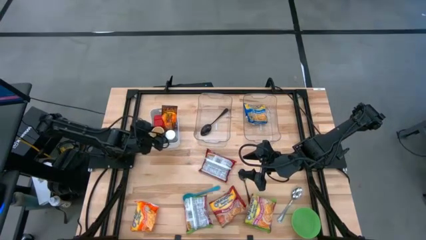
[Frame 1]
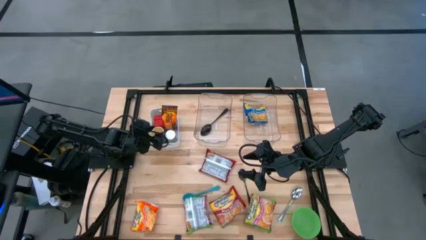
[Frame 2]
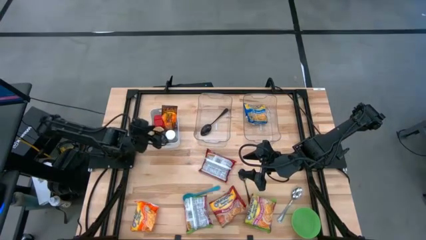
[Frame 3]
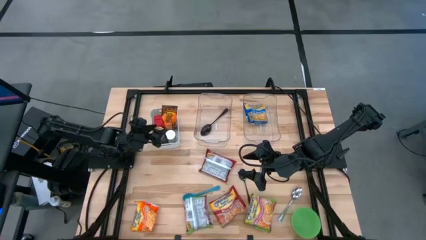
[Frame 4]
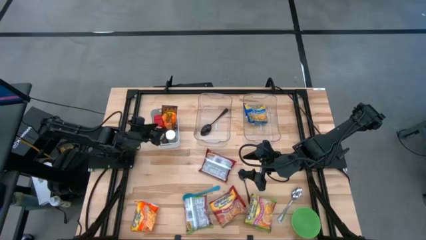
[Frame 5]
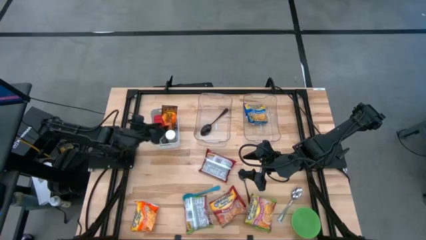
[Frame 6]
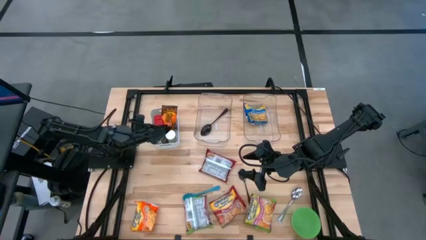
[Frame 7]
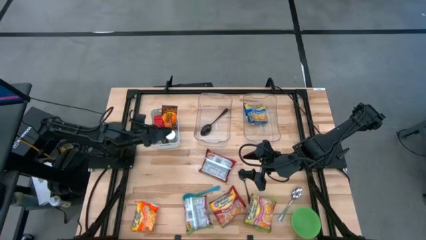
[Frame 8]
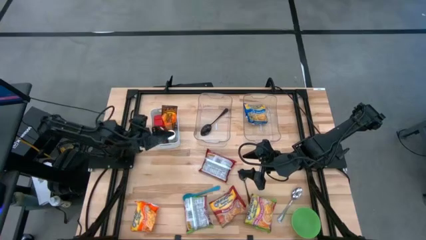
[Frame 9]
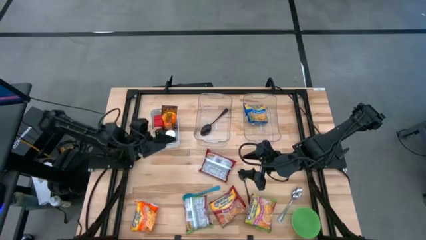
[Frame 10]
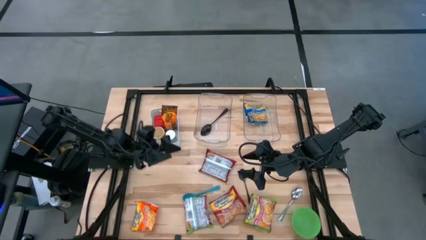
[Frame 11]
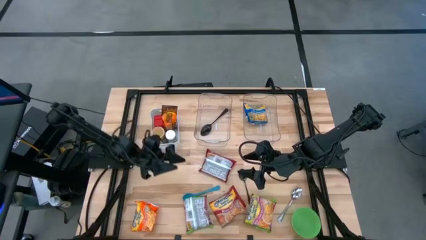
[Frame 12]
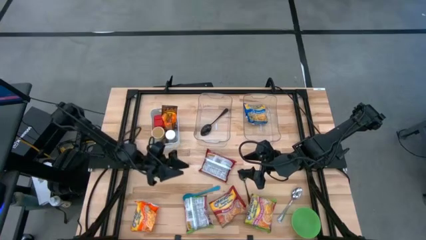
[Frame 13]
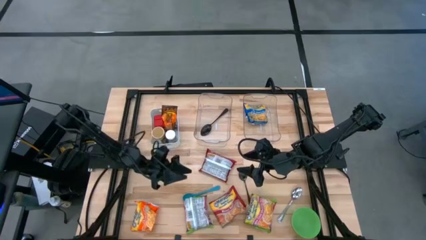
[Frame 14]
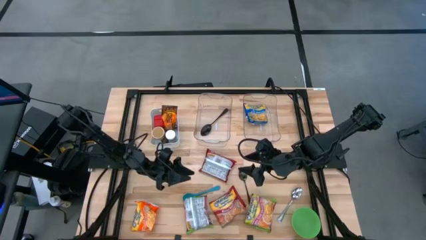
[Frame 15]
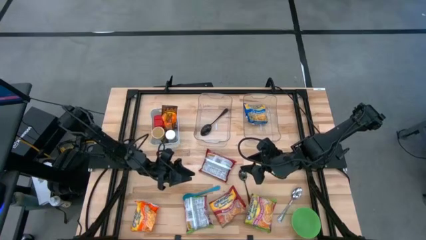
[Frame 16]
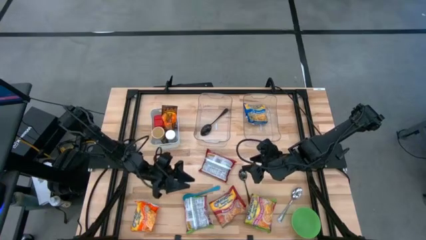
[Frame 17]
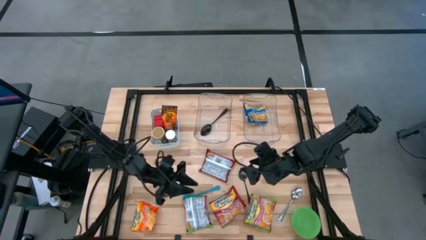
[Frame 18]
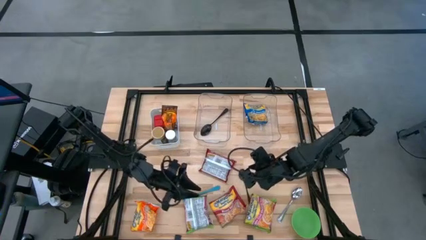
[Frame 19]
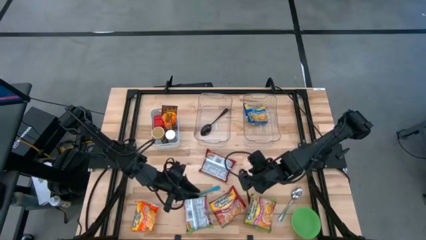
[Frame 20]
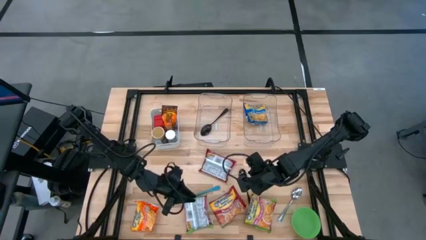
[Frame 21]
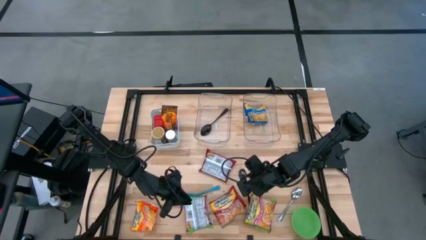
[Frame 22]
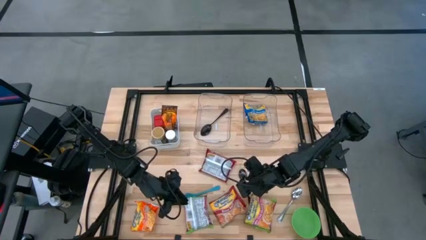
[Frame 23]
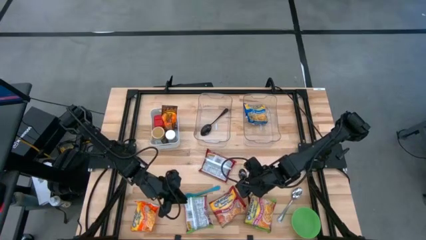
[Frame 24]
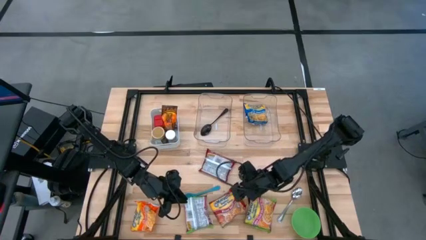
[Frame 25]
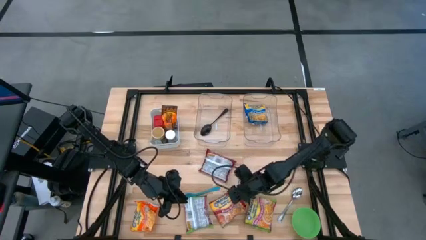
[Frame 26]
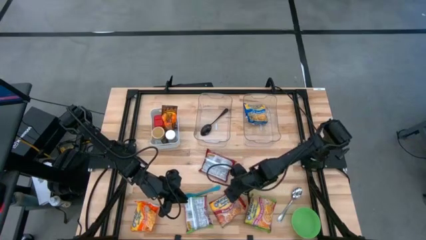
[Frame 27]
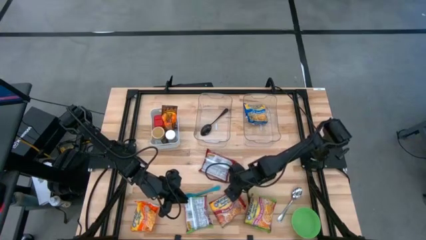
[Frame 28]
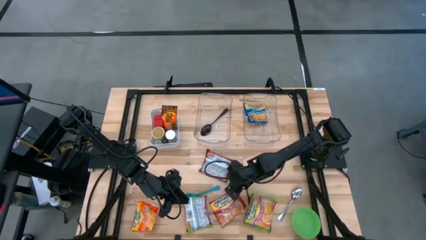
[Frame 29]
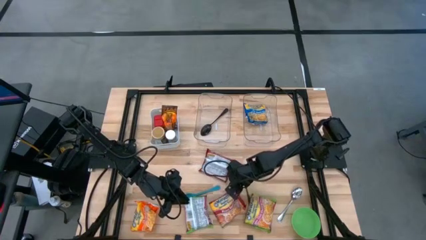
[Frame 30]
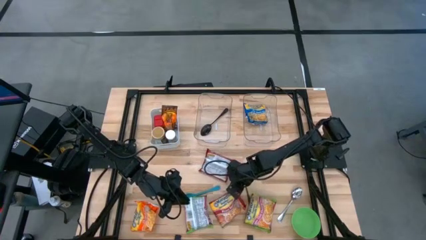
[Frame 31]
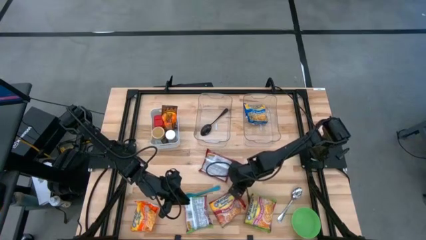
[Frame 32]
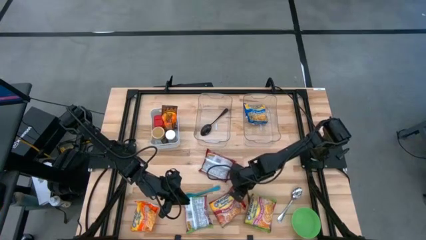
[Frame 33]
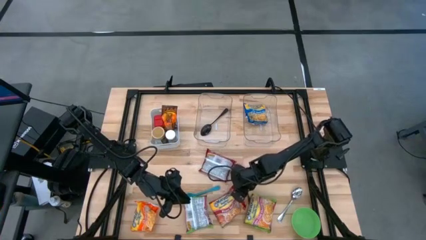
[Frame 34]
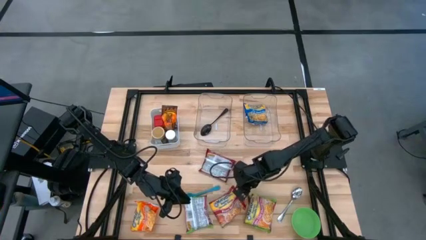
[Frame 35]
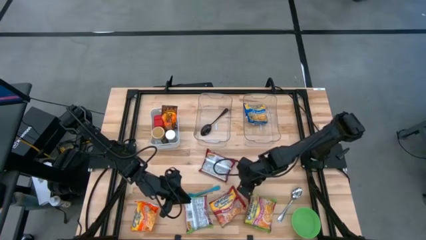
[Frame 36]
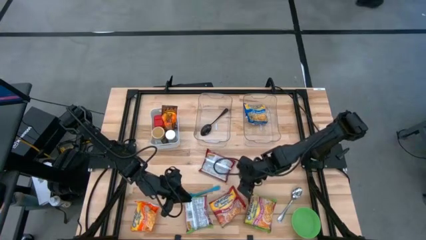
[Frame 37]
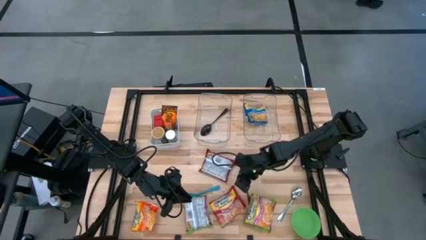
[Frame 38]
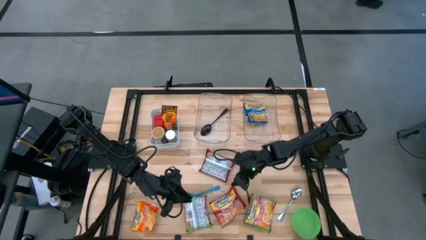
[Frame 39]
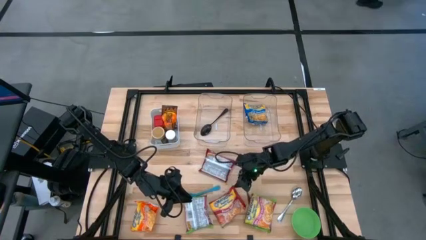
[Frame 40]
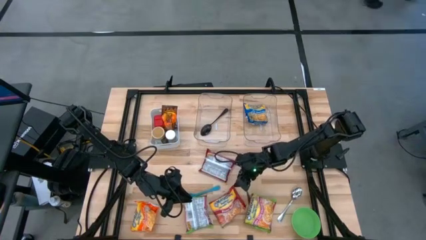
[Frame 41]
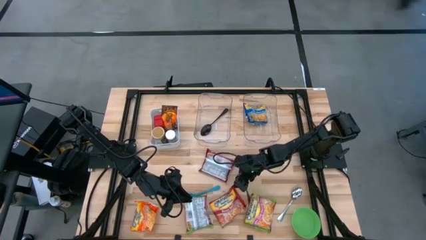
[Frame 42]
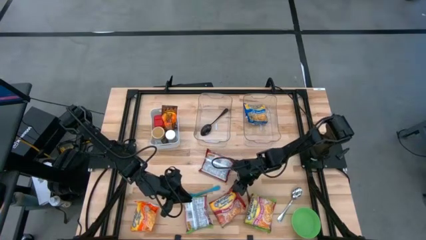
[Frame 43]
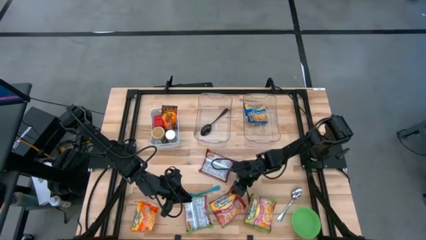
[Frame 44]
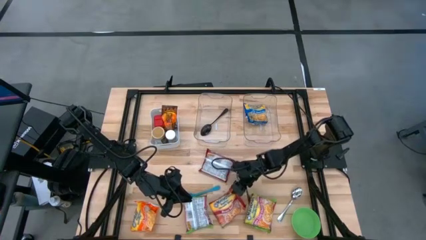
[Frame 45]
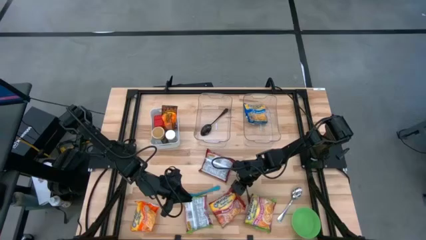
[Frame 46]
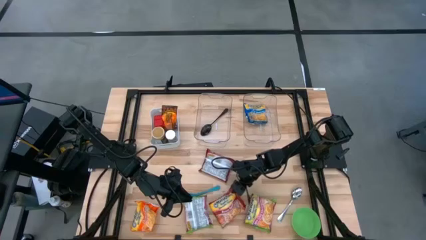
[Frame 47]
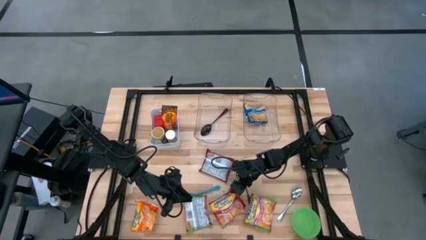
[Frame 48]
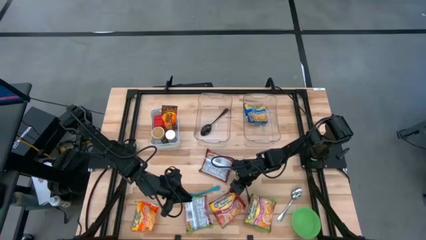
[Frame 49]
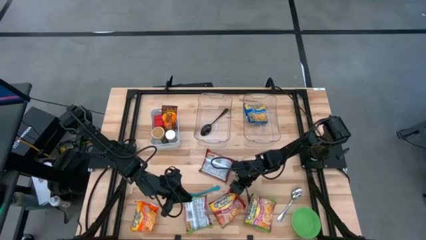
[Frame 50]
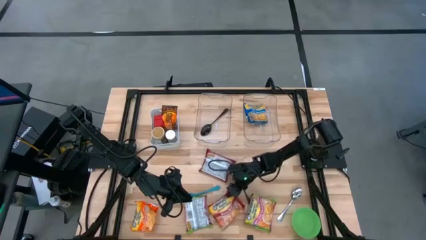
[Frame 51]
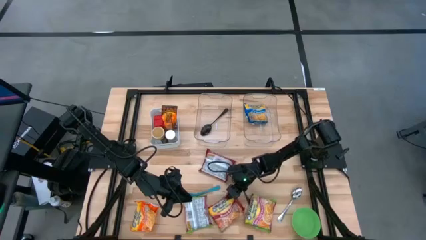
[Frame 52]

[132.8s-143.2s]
Task: Pick & Place Food Item
Put the bottom red noodle pack into the right transparent bin
